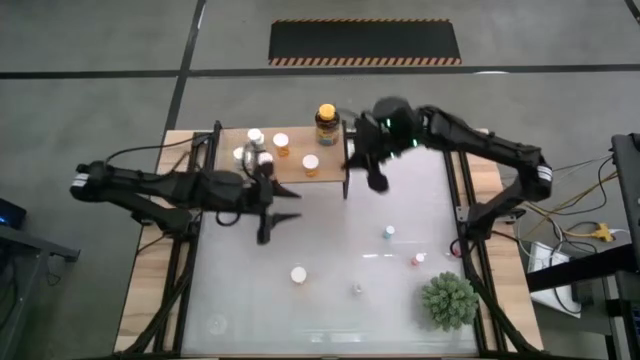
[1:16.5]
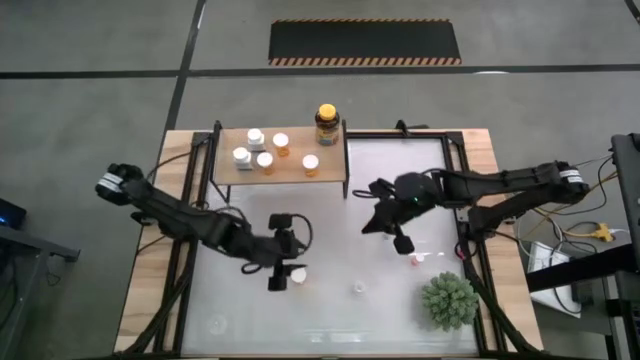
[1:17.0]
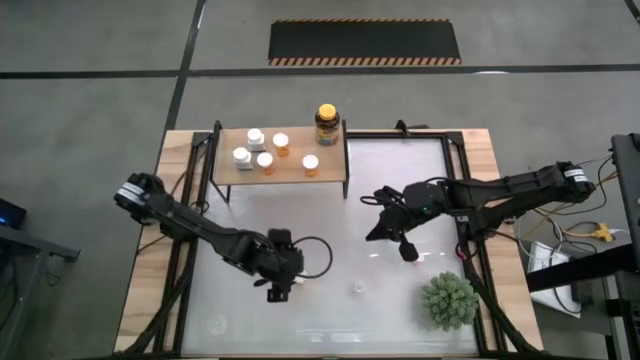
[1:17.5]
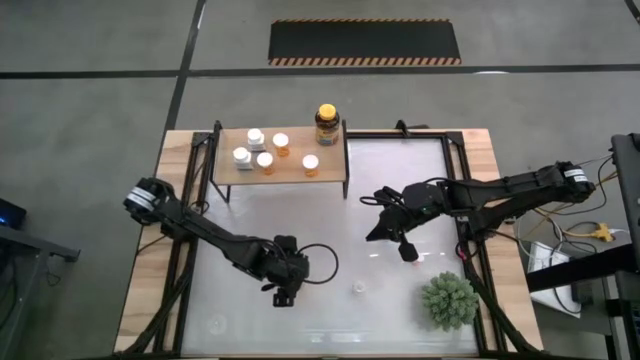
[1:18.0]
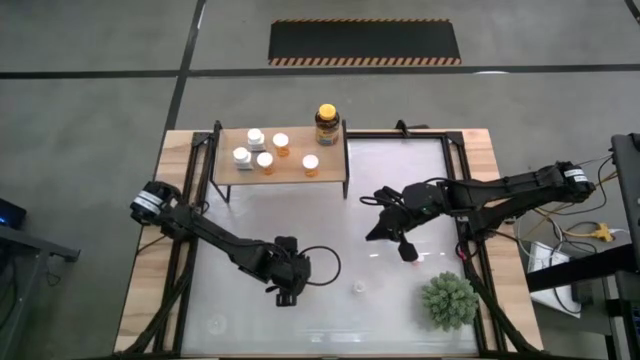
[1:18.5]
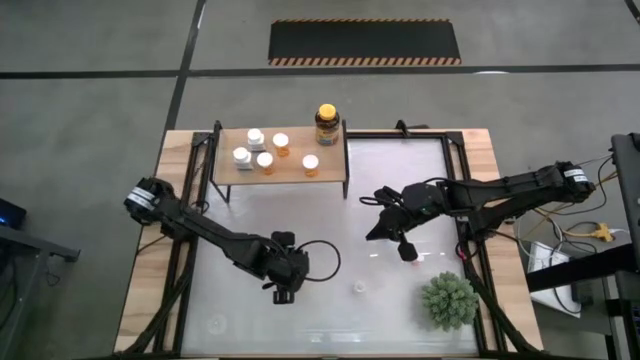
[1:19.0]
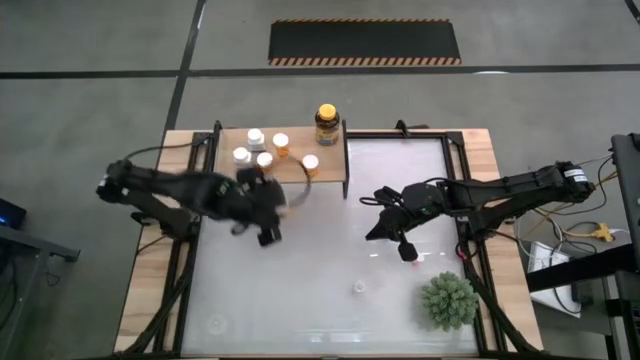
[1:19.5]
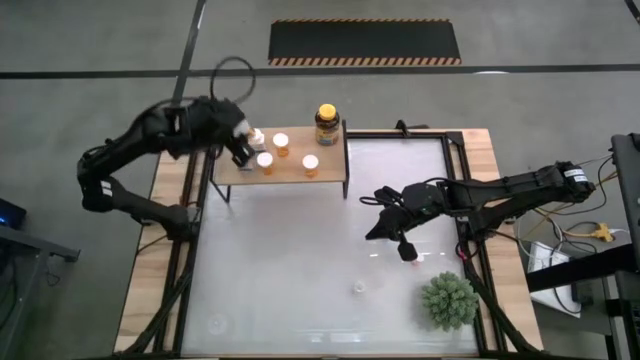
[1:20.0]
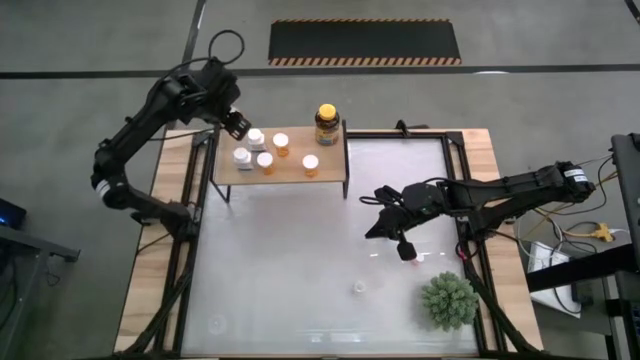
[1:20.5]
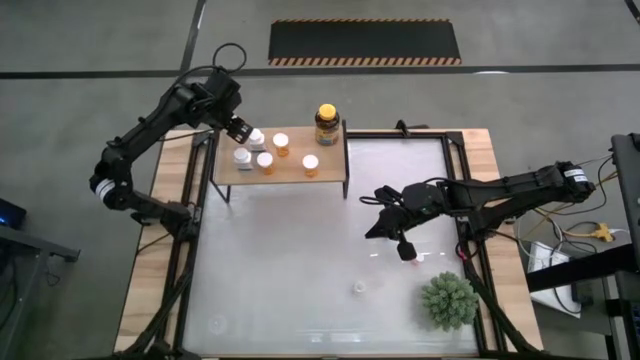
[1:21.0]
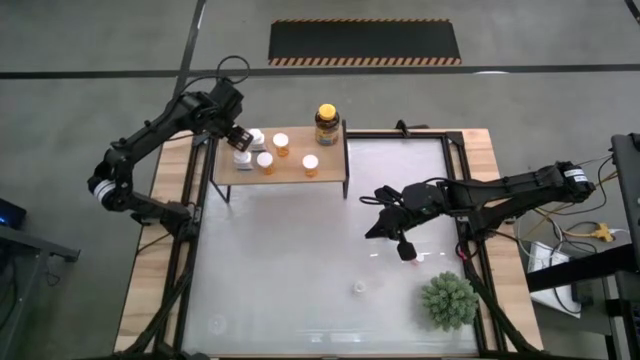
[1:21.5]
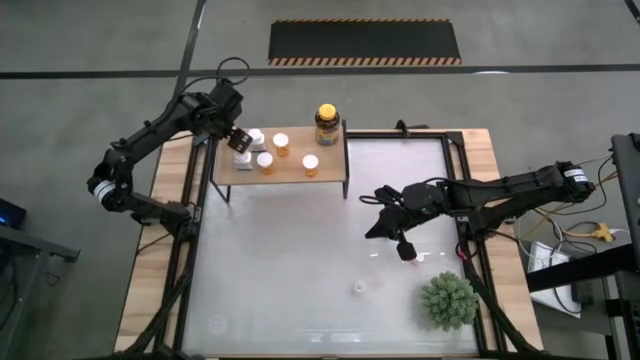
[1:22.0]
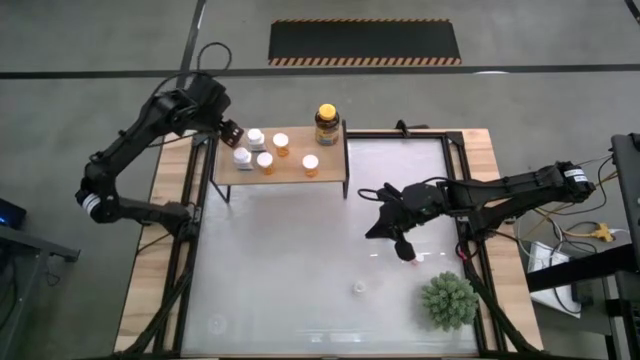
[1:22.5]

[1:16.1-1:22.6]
Task: Pick and place medicine bottles onto shelf by color
Put the orange pill bottle on the shelf

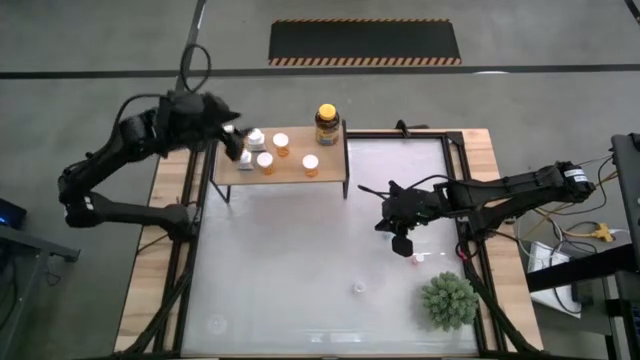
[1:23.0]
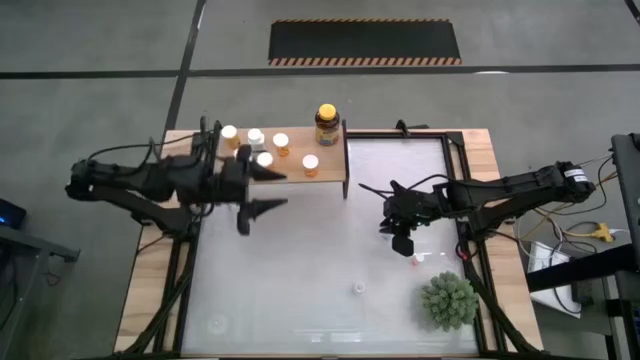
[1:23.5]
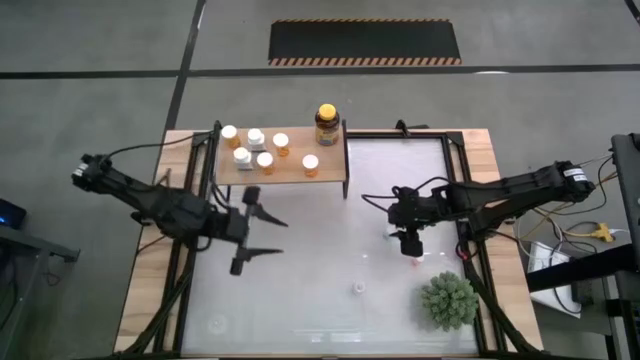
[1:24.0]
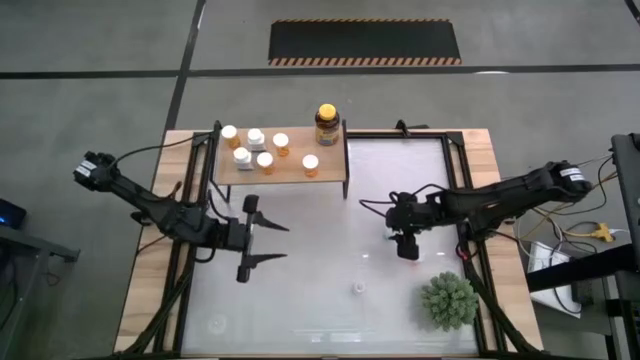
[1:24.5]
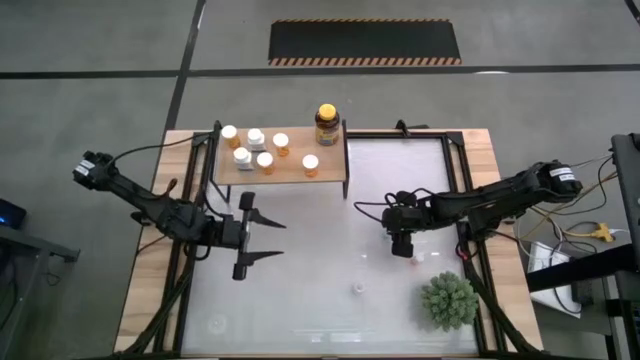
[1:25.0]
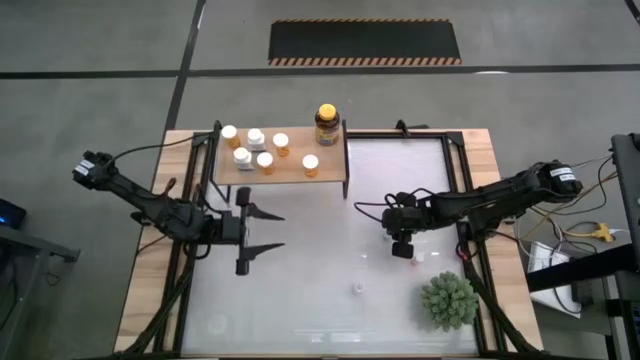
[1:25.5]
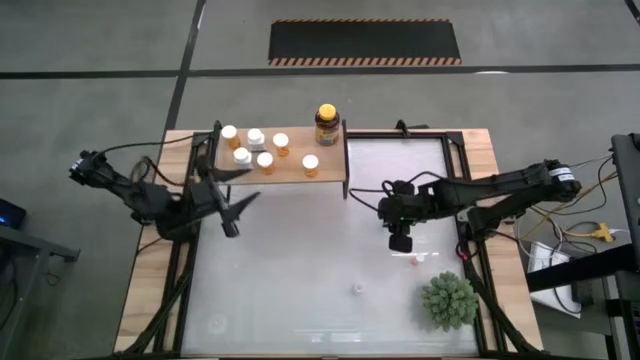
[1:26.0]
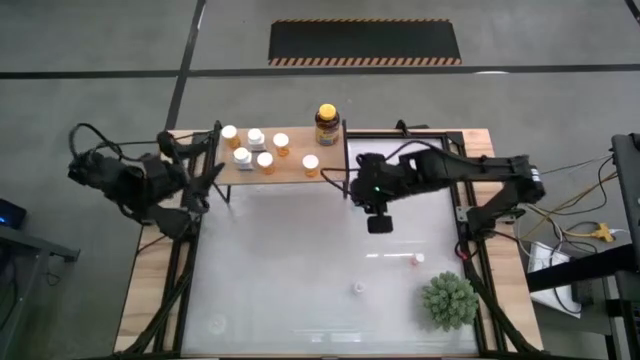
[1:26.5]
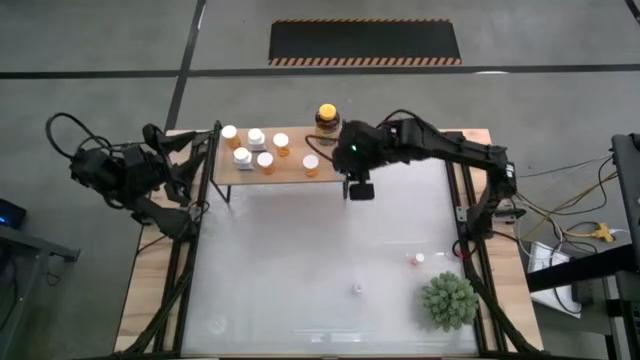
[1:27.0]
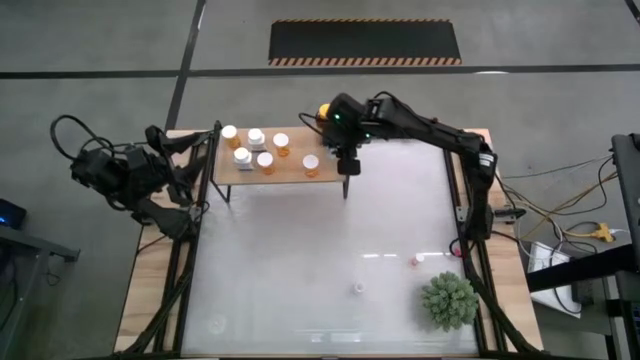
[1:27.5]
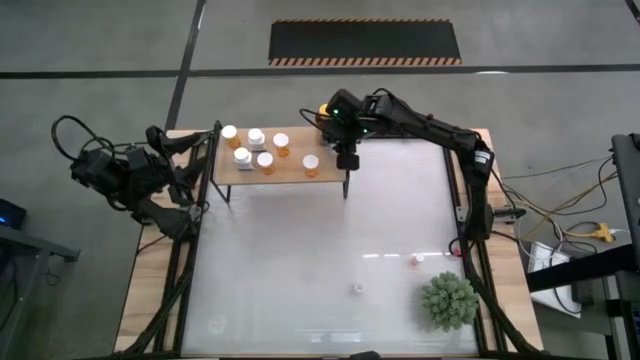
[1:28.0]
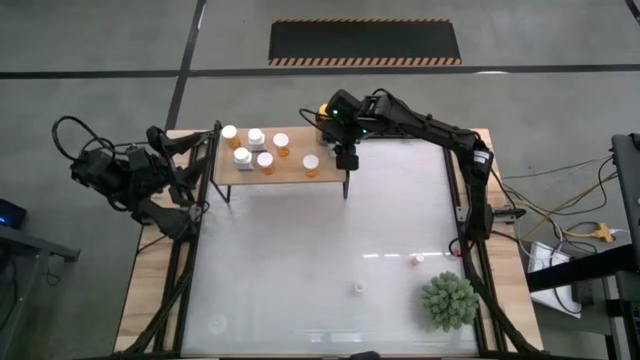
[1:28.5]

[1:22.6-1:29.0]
Put the blue pill bottle on the shelf

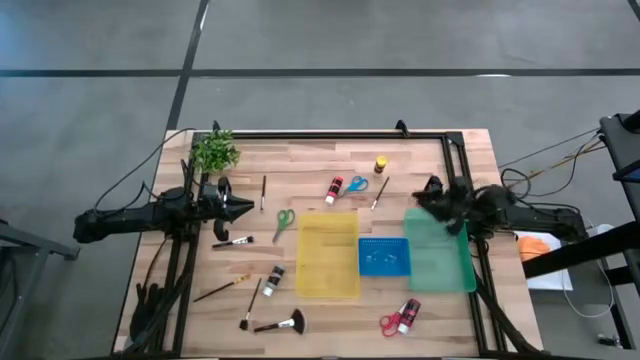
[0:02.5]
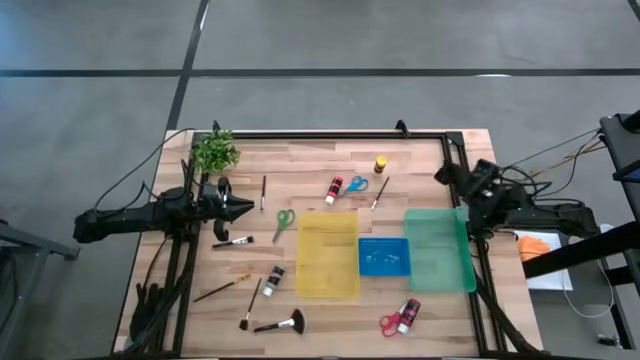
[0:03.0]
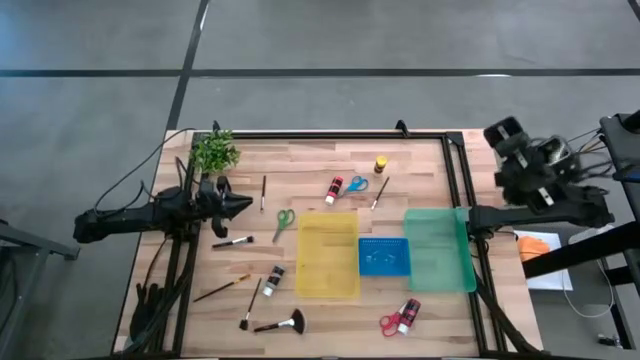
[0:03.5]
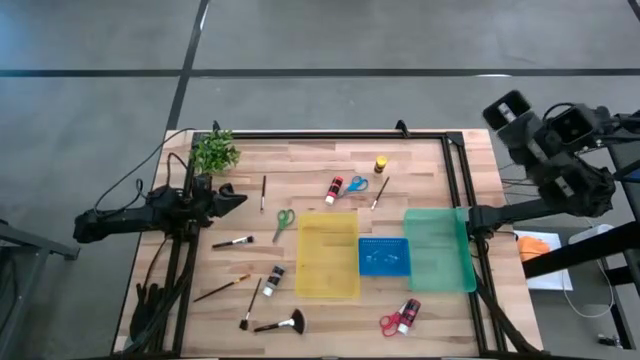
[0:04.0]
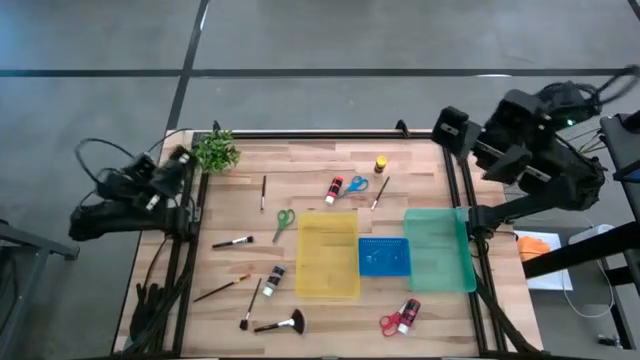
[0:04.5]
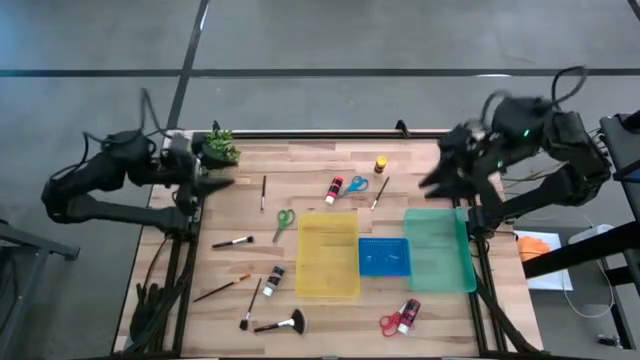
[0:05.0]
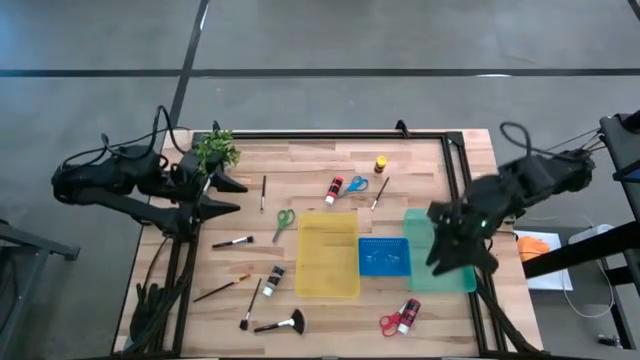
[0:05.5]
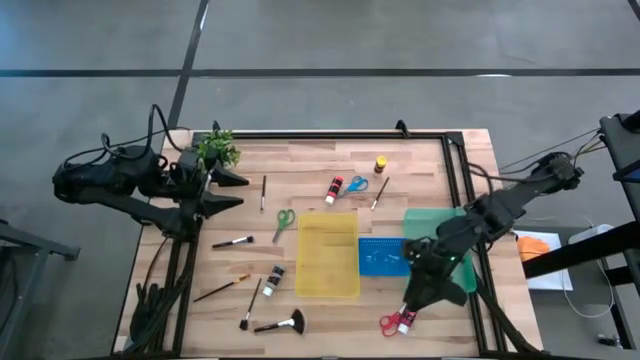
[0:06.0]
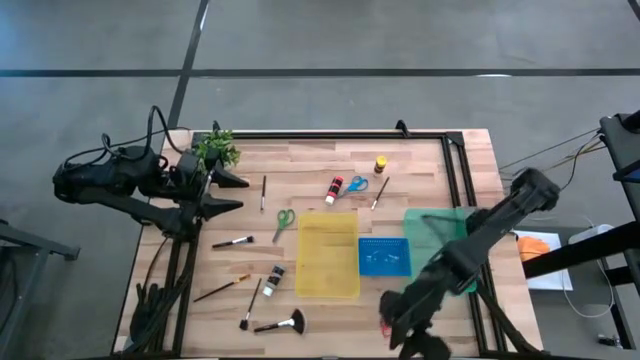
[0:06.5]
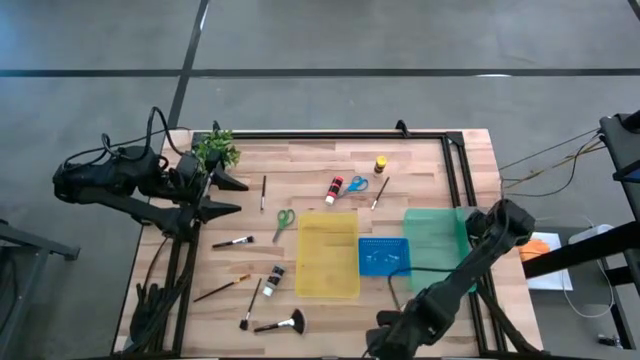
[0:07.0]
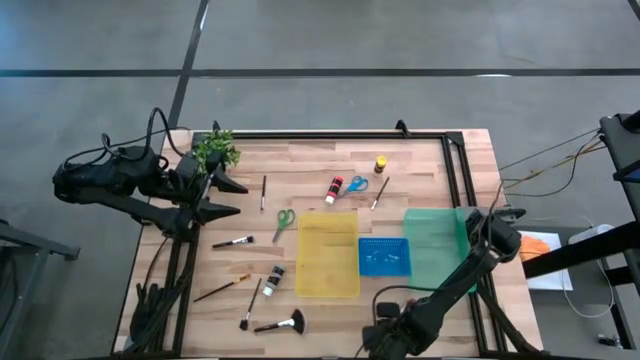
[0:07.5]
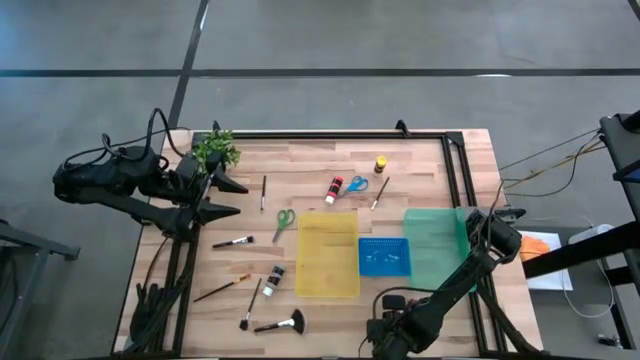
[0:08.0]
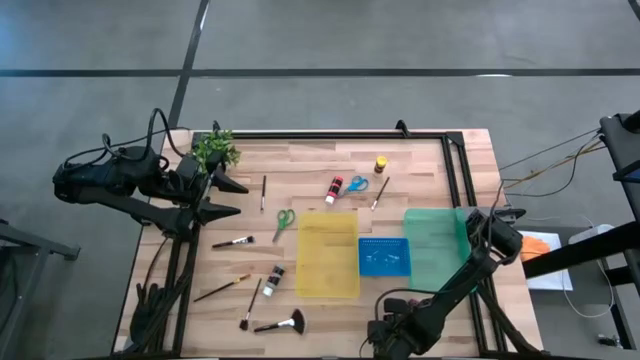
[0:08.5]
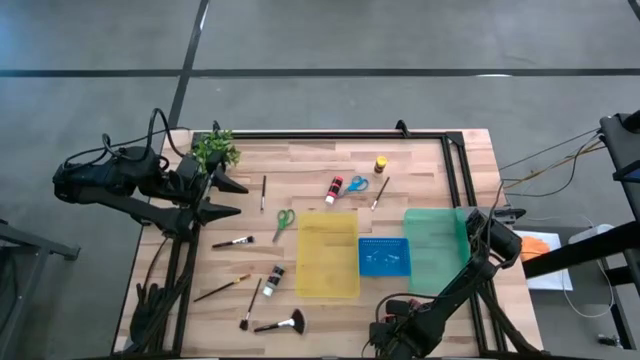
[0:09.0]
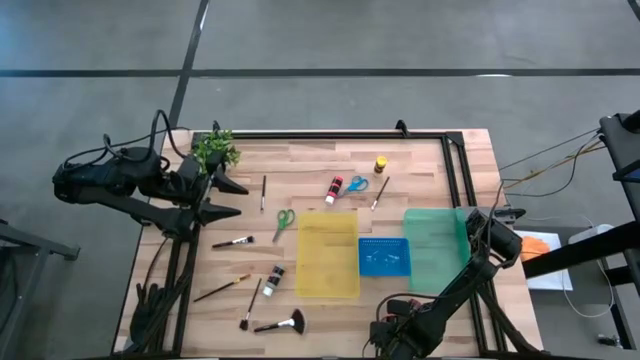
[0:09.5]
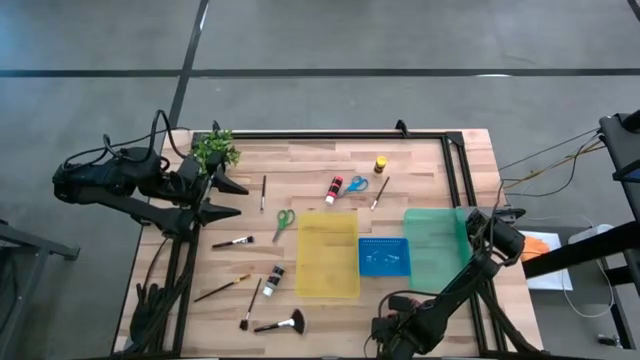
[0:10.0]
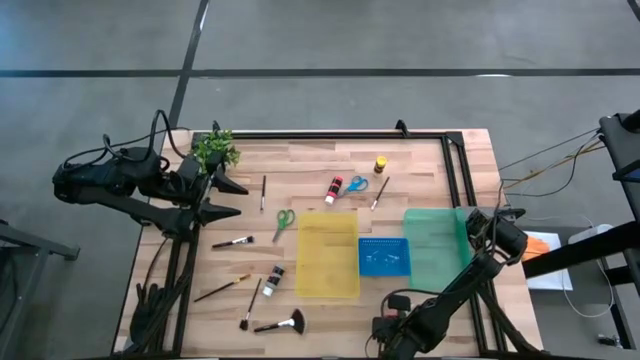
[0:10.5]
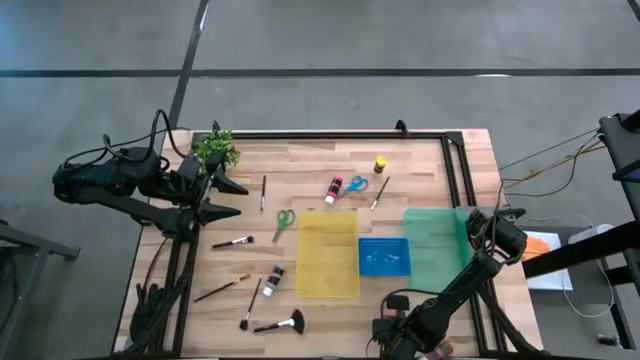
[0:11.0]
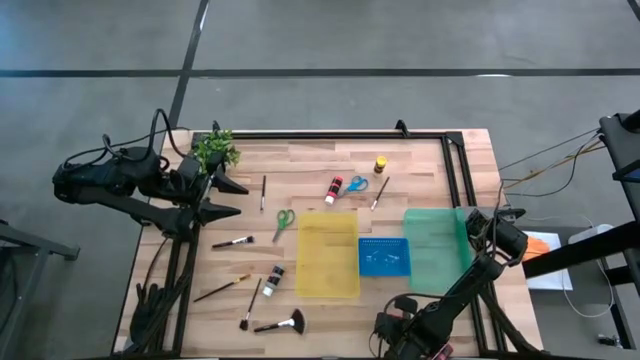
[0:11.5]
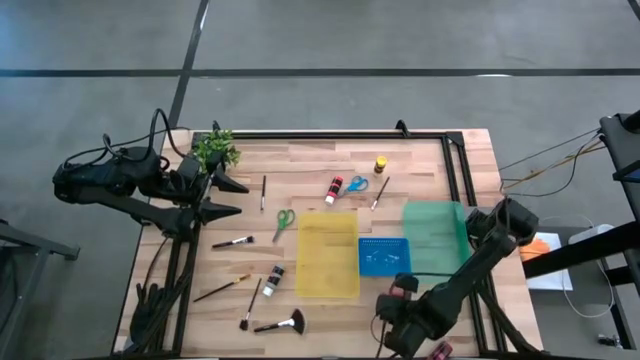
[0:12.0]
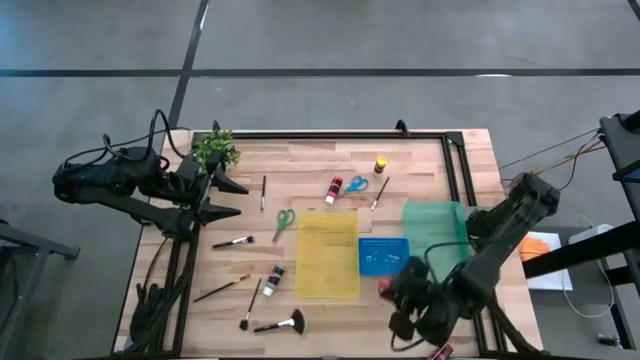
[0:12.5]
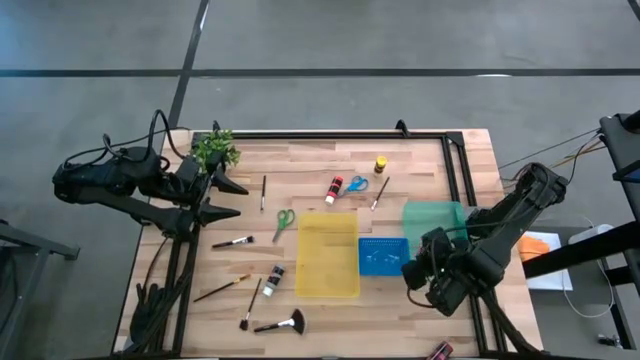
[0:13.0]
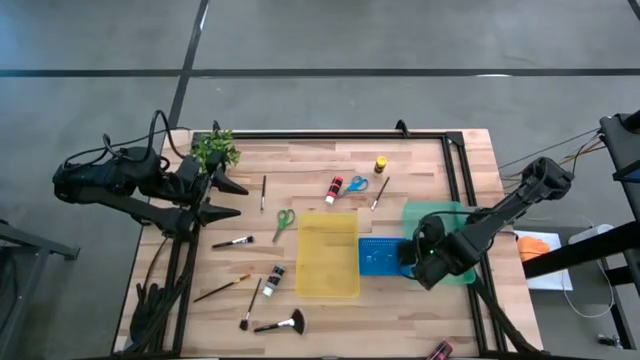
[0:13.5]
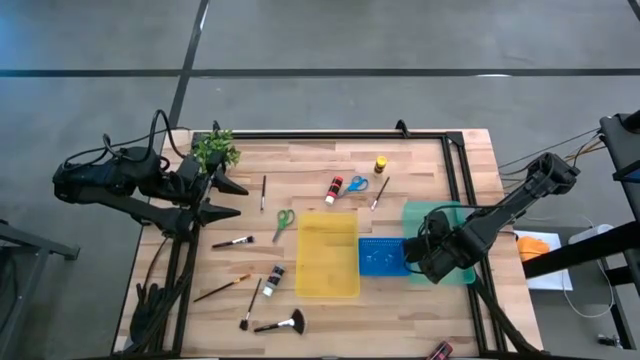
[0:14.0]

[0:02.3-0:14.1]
Task: Pick & Place Paint Supplies
Put the red scissors into the green bin
